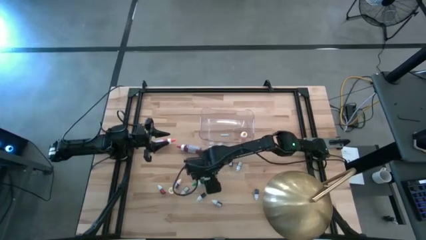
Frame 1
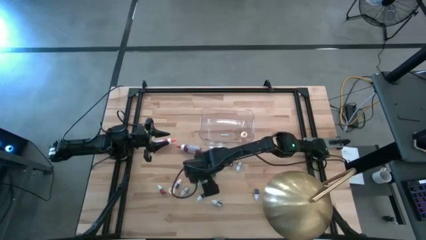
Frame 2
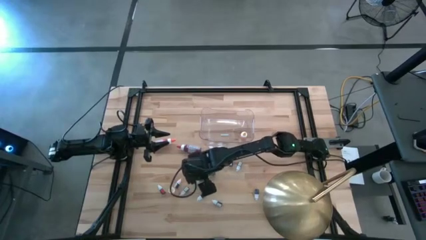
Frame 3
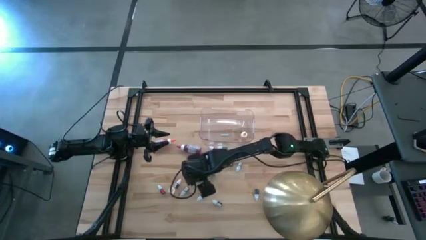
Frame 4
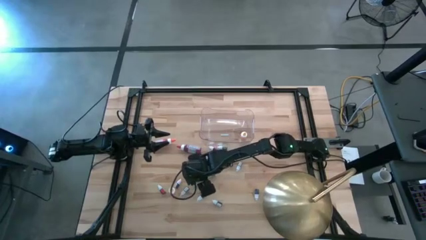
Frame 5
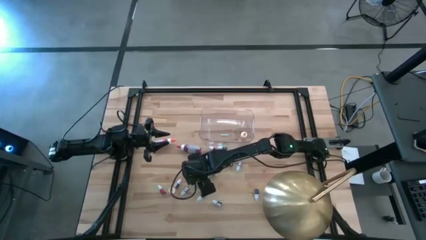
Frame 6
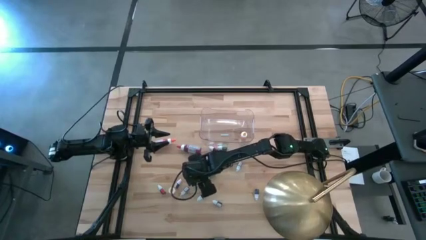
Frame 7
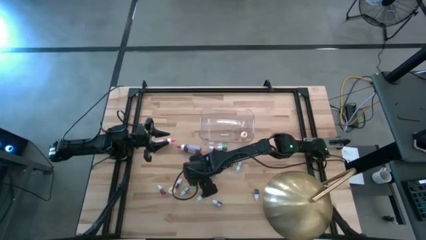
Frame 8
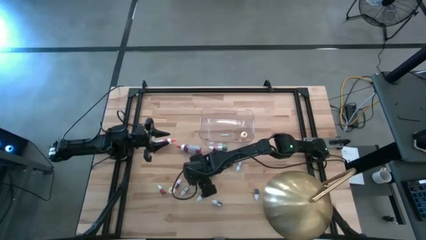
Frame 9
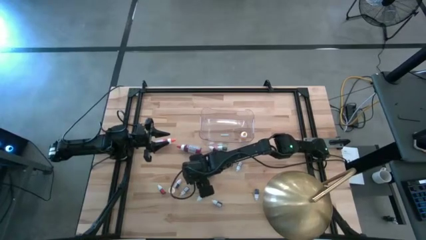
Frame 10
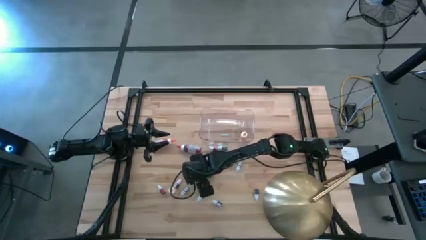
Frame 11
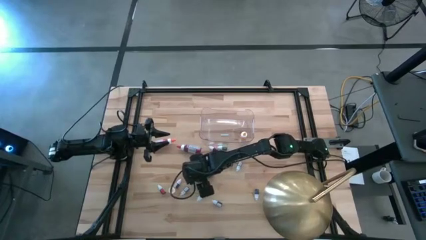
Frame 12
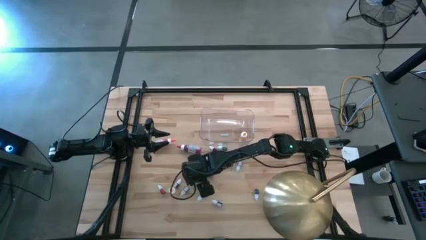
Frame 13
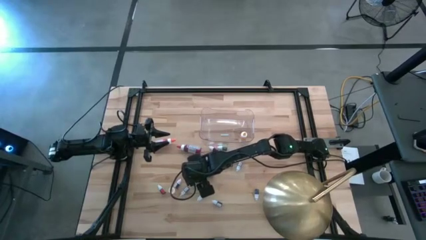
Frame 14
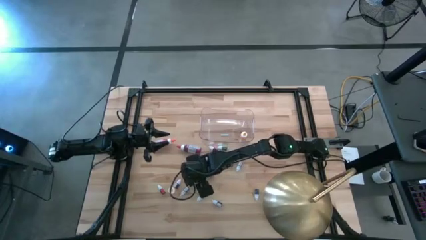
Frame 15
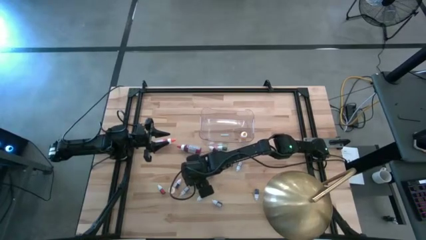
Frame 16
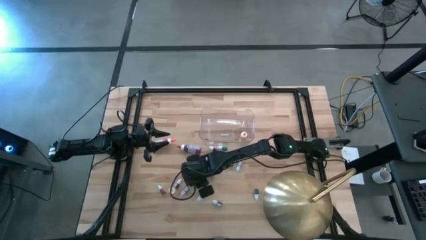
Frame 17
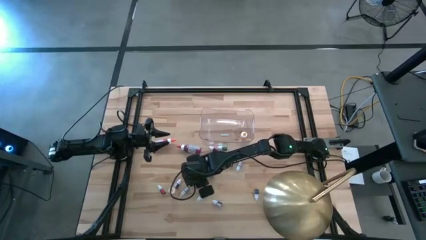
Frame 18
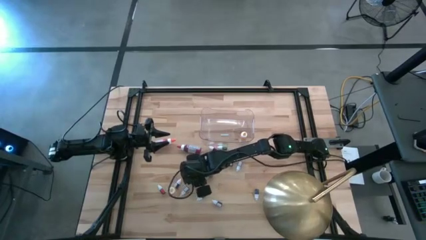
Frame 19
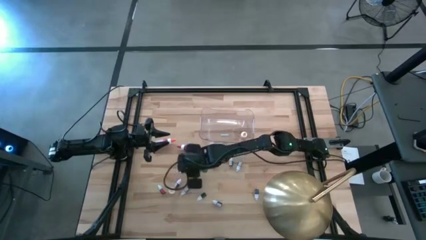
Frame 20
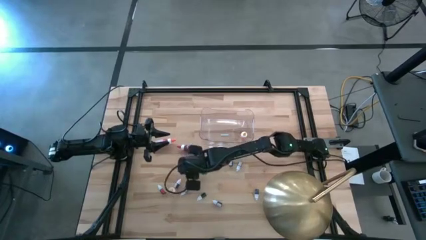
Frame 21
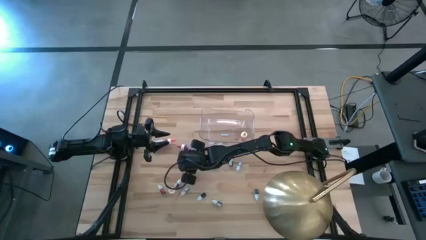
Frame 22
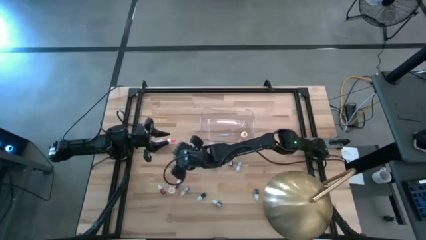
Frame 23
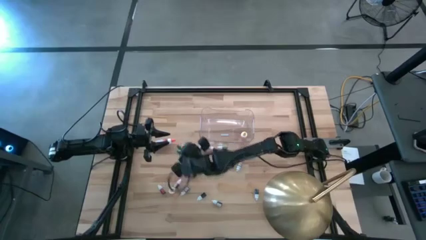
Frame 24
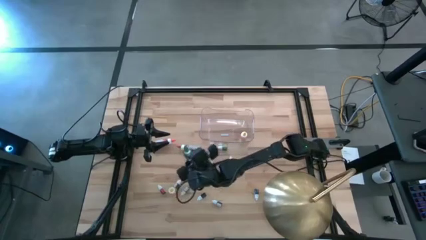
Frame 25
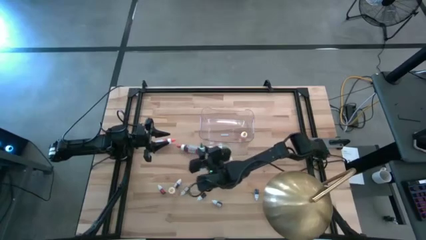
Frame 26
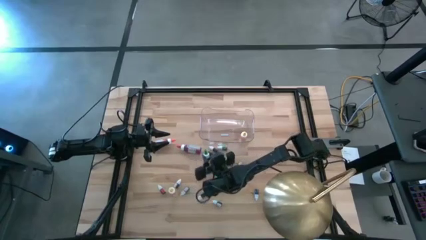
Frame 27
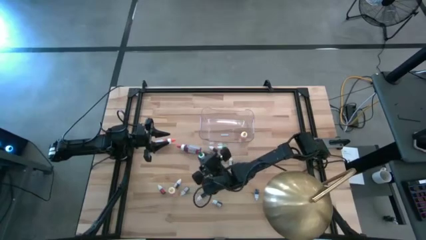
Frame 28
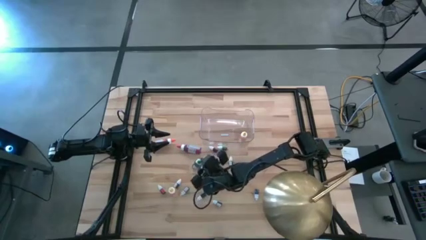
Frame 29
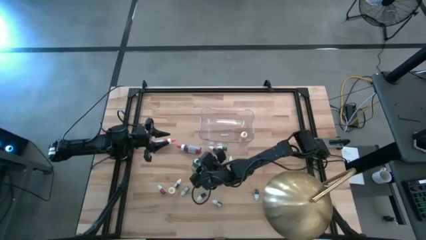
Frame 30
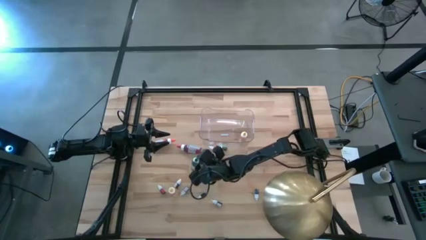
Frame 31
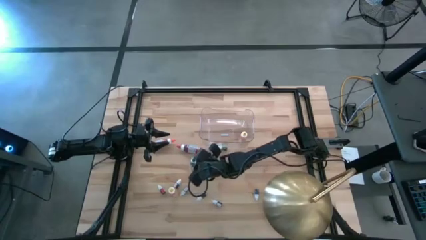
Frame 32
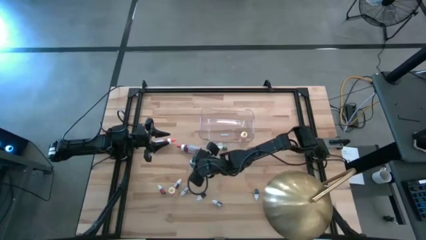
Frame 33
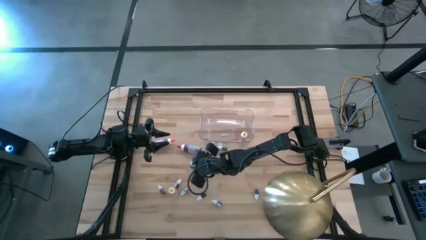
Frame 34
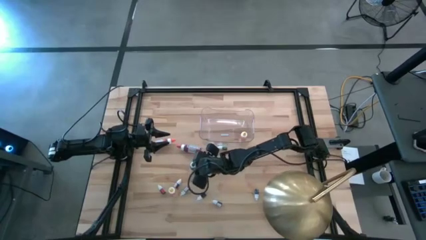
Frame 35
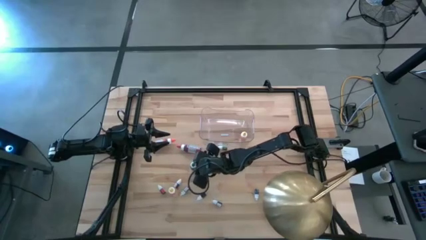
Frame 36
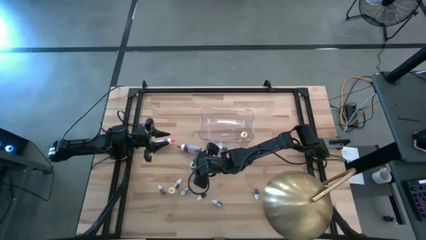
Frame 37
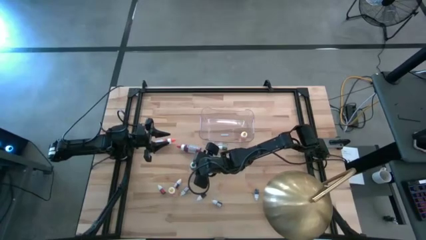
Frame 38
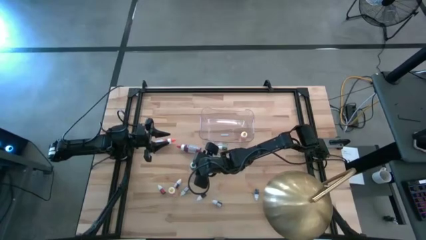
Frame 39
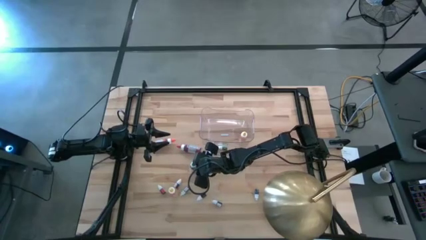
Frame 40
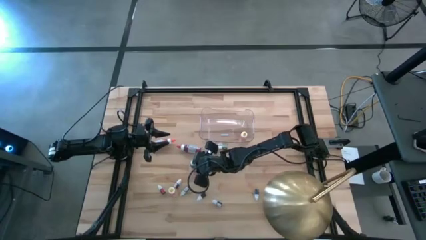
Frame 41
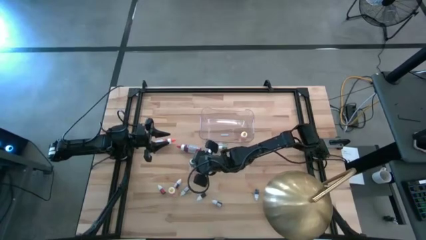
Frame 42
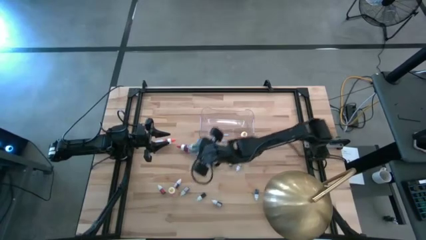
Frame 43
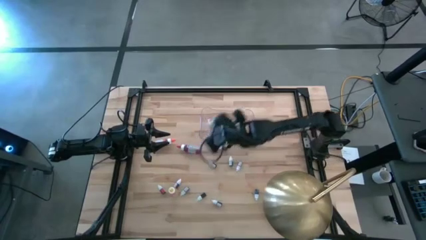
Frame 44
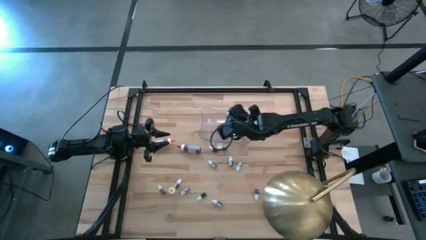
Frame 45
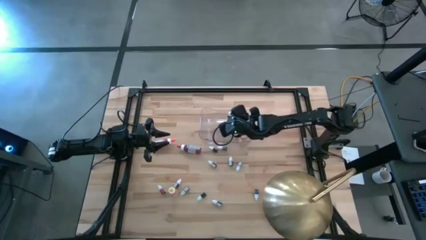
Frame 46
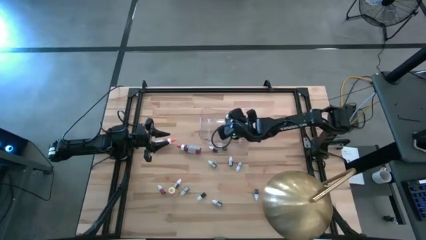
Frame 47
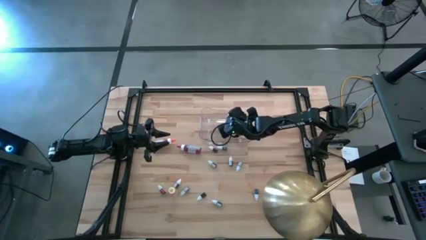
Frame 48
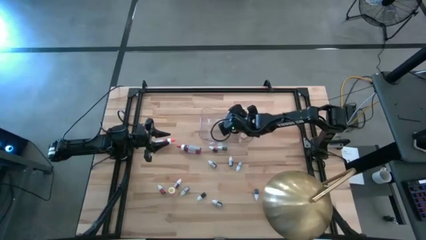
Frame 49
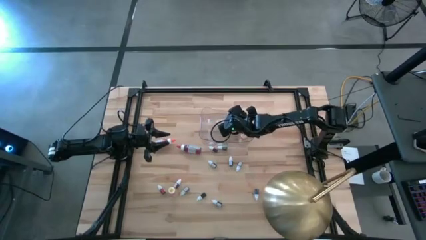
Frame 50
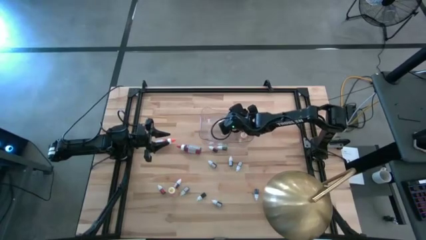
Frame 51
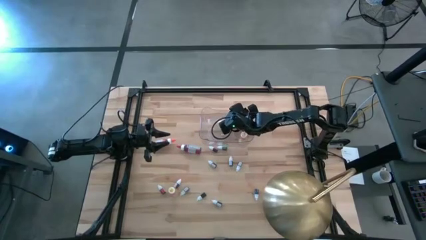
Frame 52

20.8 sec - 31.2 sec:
Task: Pick & Place food coloring
Put the large green food coloring bottle in the transparent bin

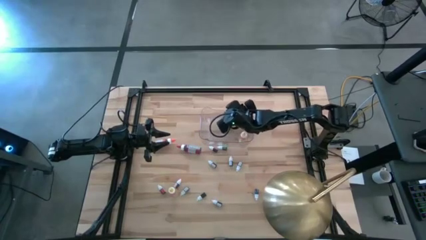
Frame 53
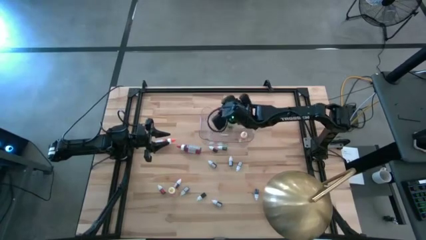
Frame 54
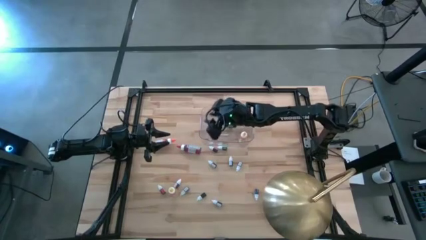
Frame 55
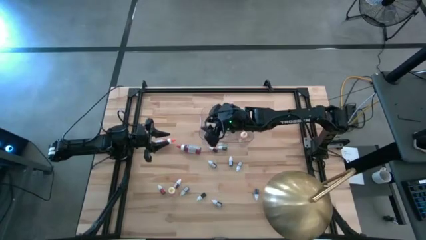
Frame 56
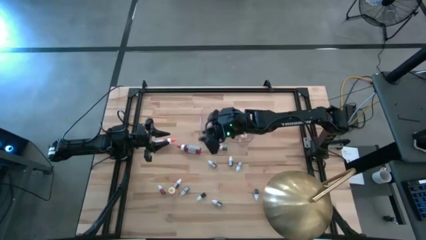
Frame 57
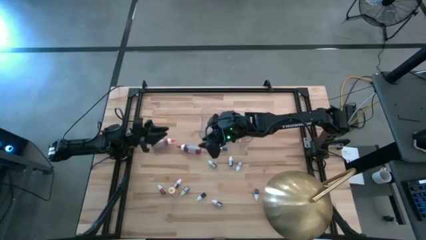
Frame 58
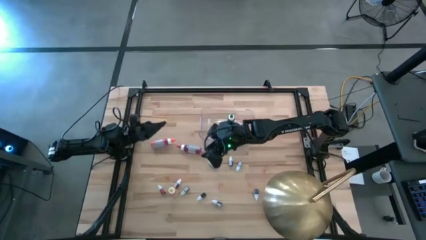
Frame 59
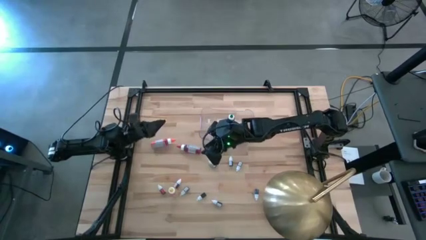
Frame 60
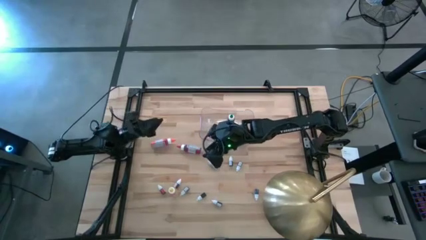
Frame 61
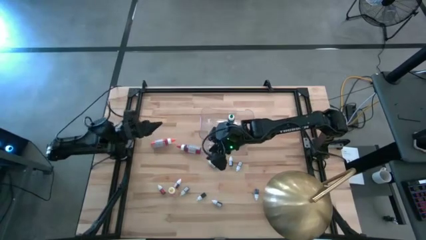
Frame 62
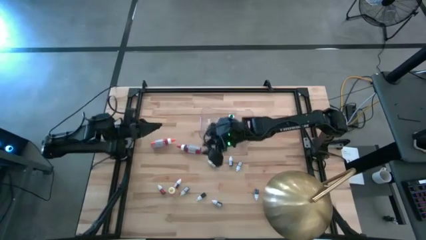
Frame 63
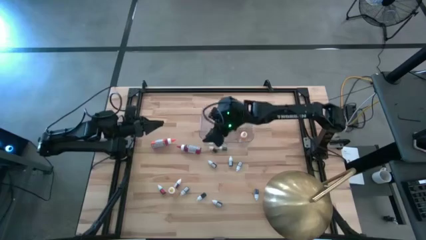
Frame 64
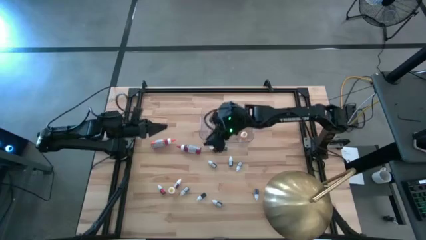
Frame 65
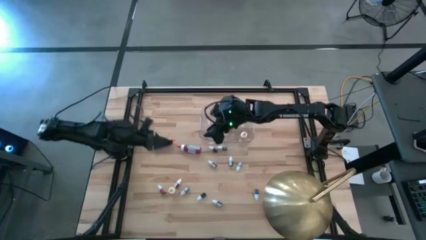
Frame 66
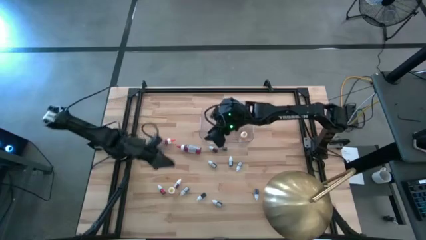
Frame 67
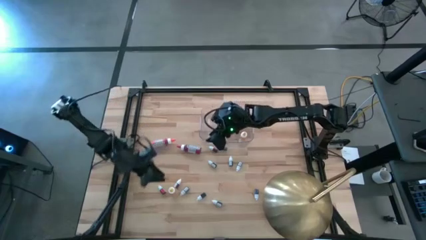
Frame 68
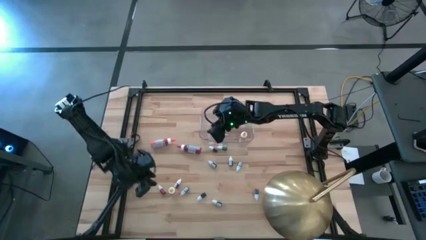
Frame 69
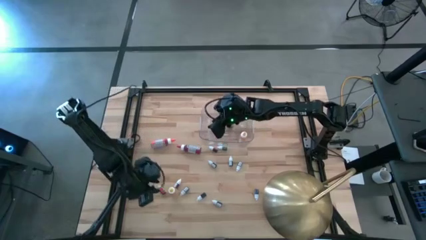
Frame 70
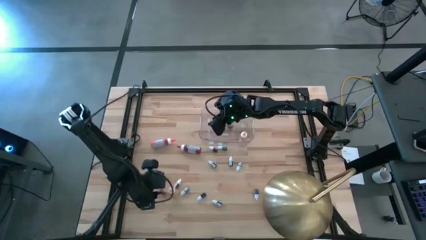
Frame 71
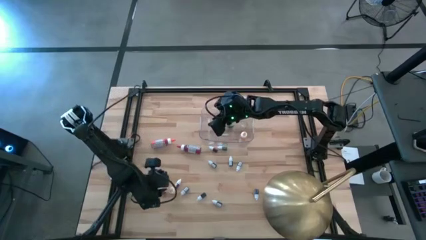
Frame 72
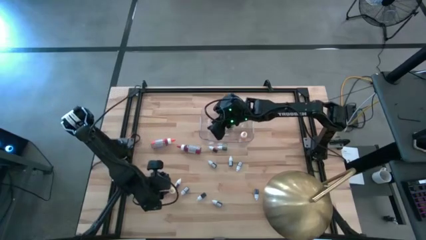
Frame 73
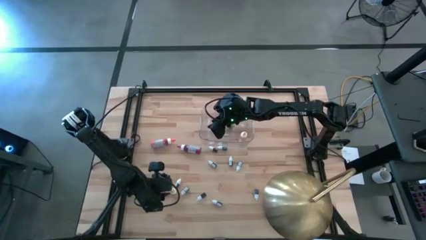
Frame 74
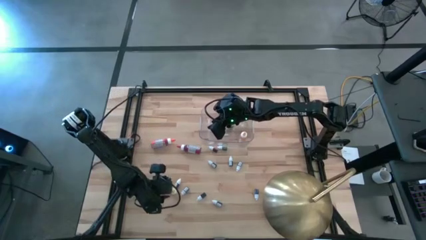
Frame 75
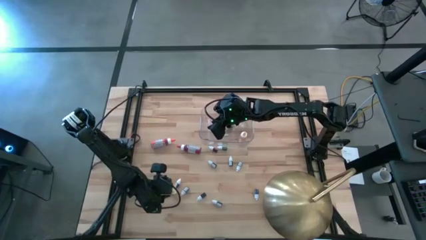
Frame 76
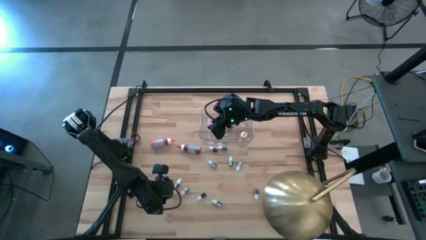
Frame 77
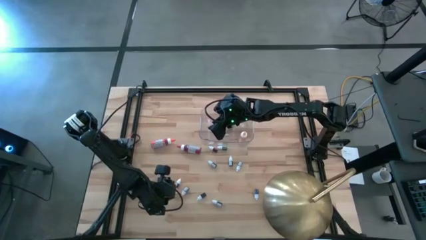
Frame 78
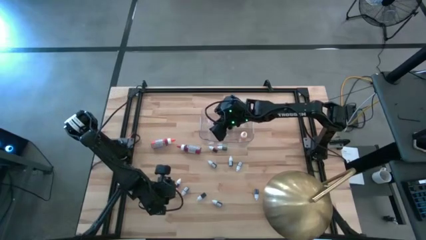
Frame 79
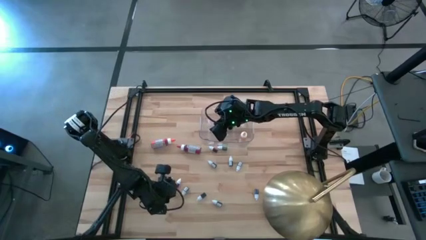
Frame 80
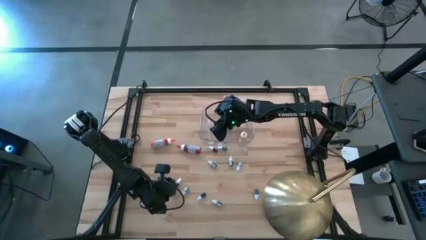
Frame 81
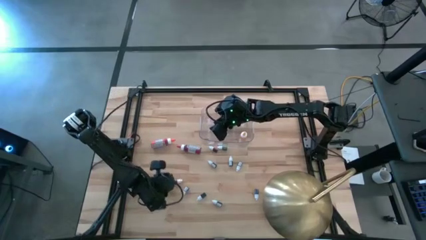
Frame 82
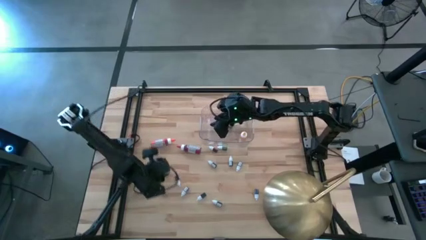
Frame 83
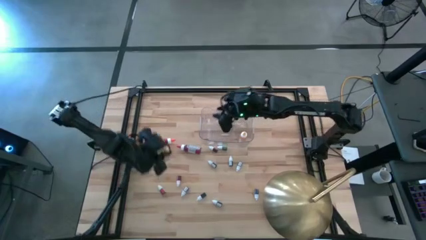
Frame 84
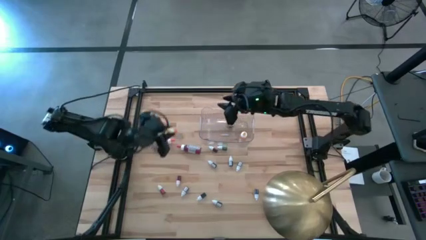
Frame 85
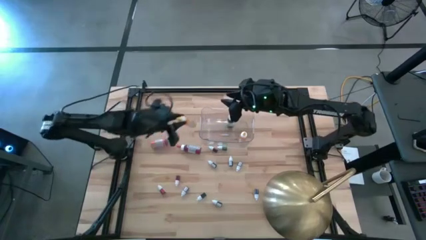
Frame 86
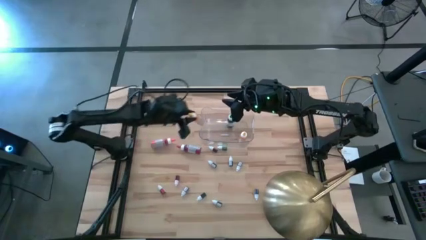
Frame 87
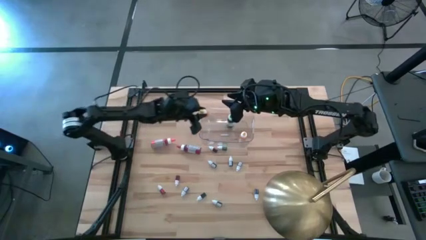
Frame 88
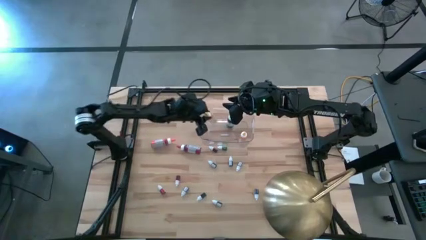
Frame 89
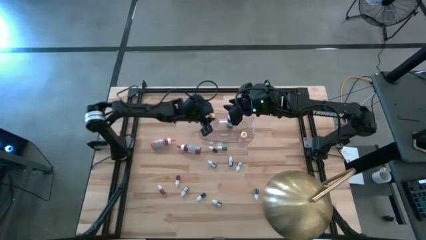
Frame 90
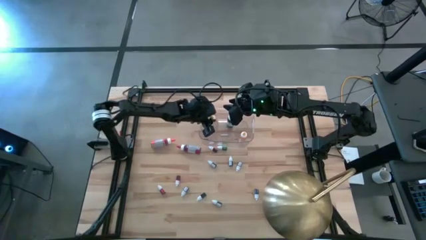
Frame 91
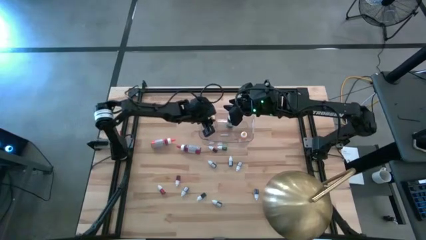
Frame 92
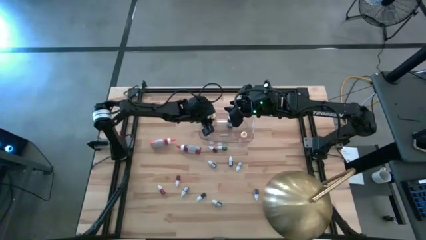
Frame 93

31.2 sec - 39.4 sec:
Put the large yellow food coloring bottle in the transparent bin
